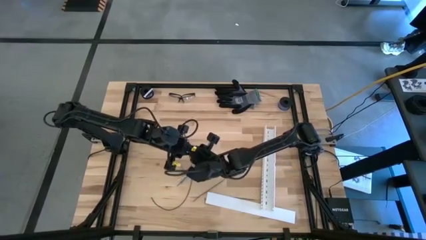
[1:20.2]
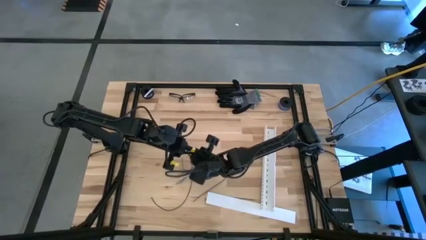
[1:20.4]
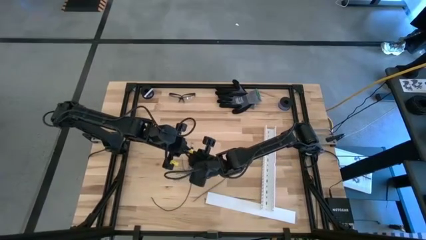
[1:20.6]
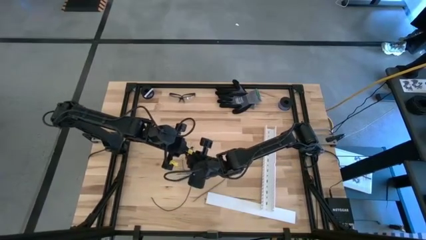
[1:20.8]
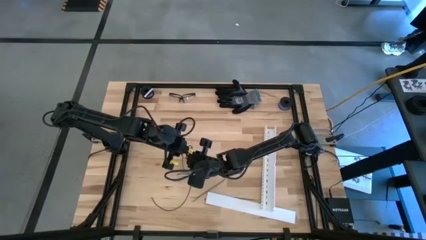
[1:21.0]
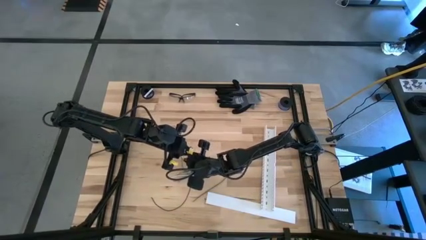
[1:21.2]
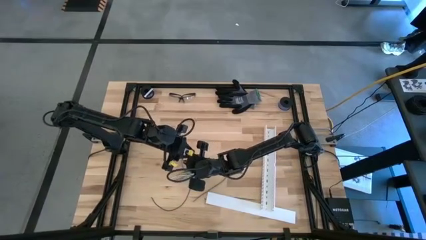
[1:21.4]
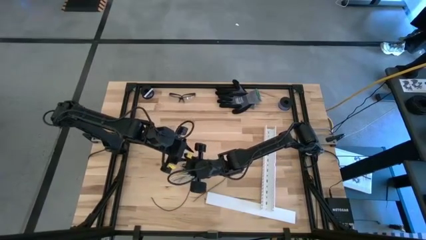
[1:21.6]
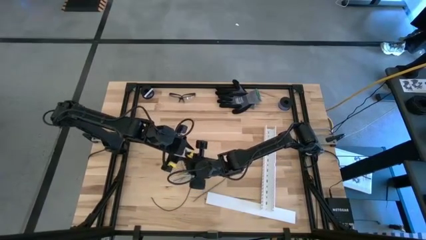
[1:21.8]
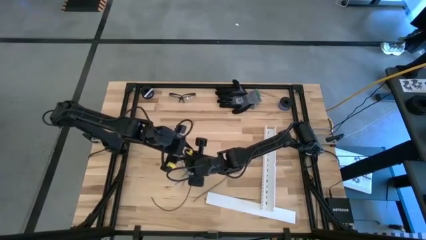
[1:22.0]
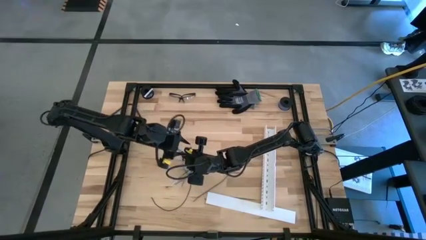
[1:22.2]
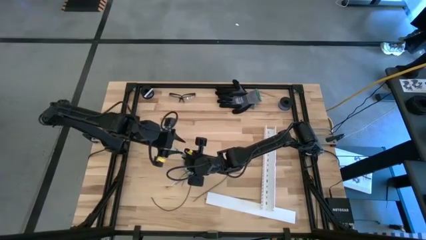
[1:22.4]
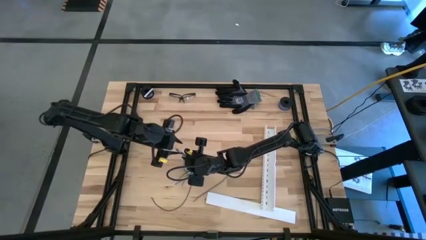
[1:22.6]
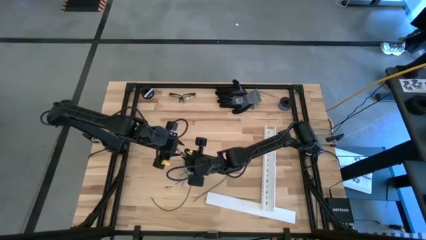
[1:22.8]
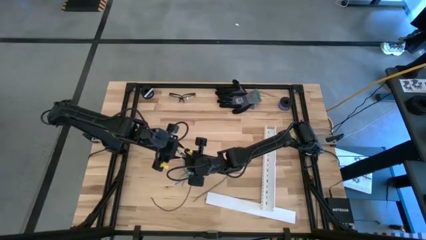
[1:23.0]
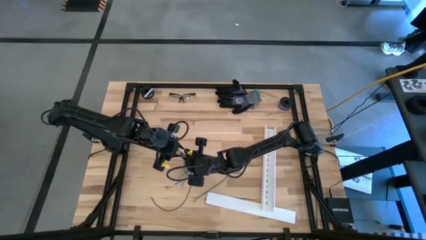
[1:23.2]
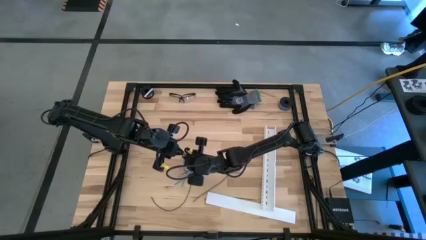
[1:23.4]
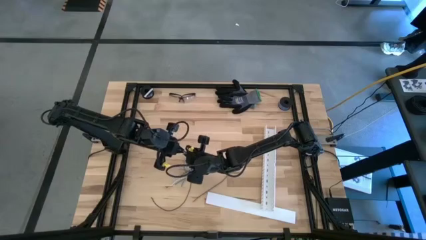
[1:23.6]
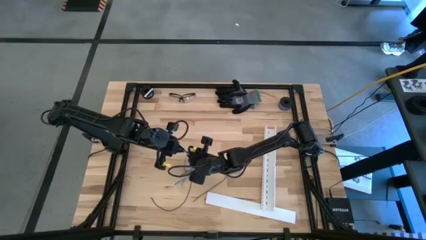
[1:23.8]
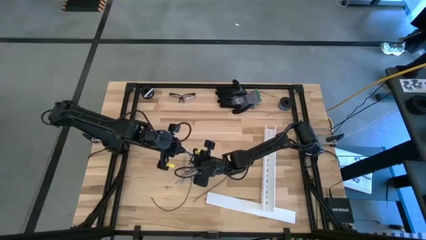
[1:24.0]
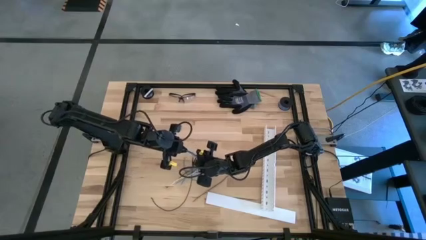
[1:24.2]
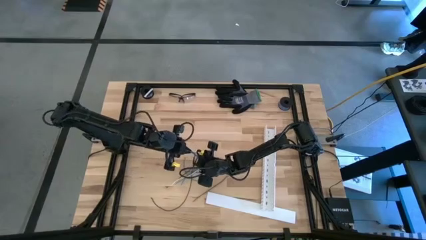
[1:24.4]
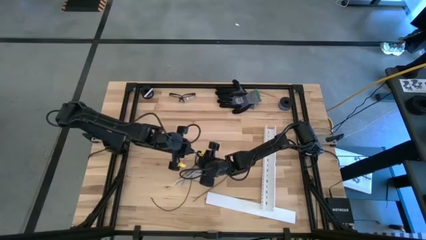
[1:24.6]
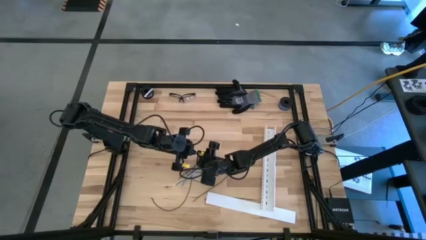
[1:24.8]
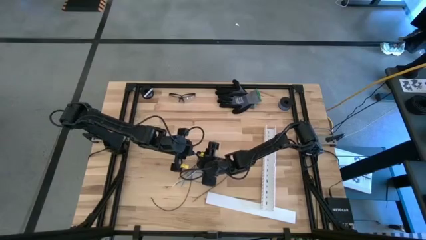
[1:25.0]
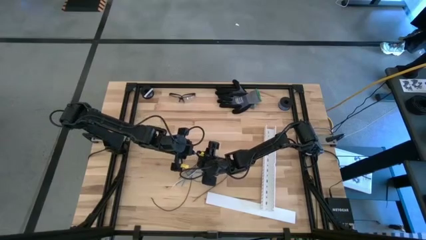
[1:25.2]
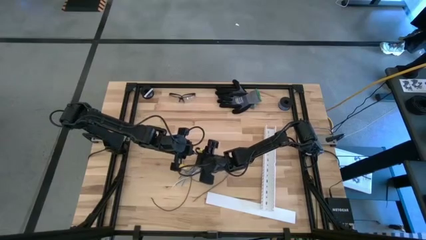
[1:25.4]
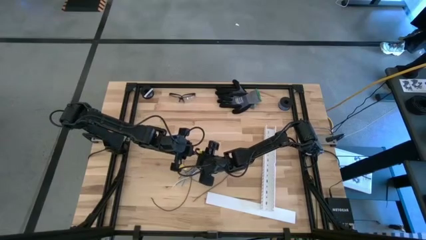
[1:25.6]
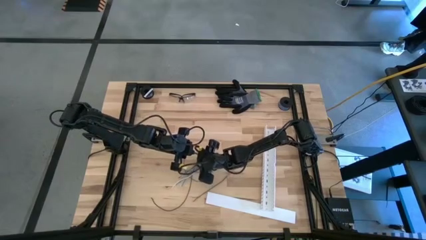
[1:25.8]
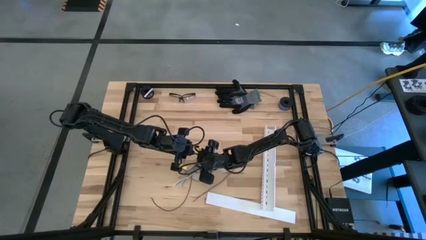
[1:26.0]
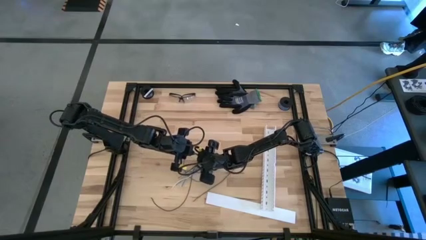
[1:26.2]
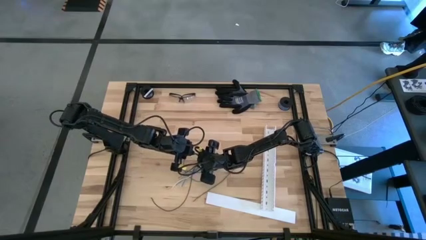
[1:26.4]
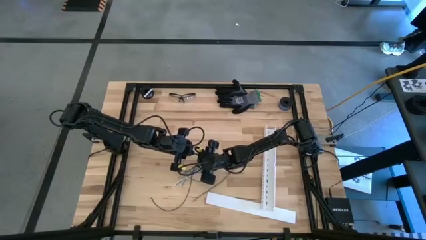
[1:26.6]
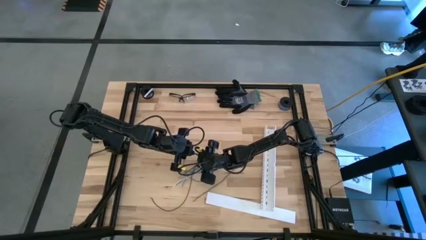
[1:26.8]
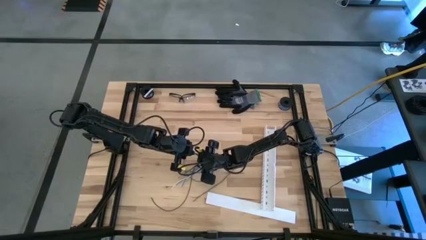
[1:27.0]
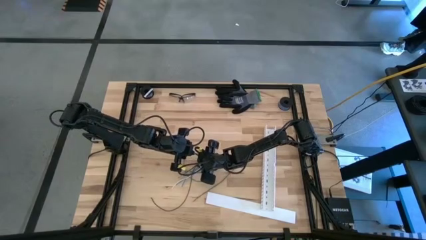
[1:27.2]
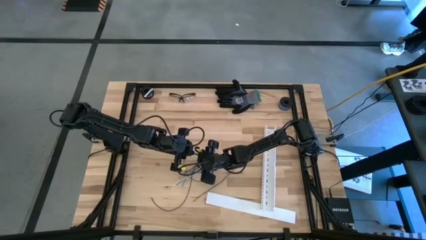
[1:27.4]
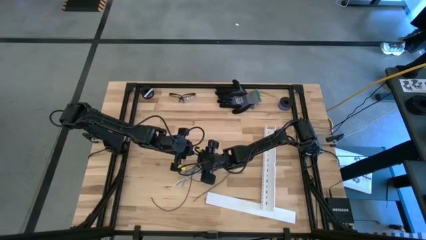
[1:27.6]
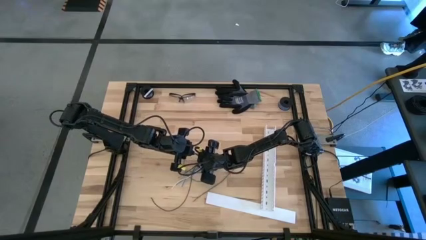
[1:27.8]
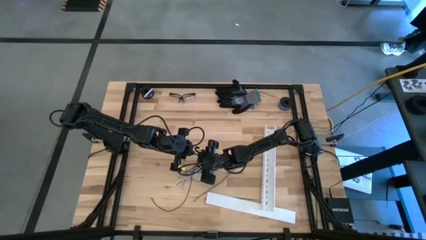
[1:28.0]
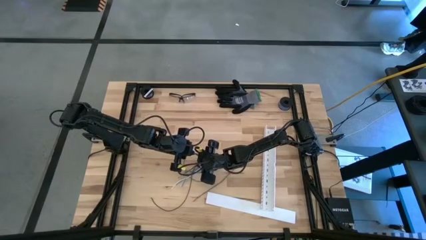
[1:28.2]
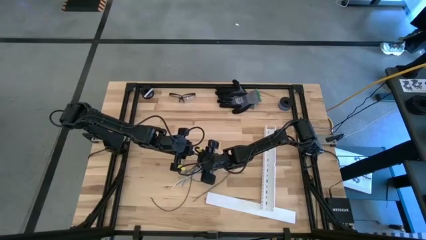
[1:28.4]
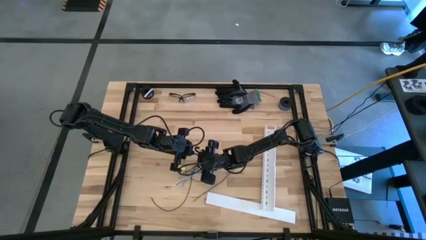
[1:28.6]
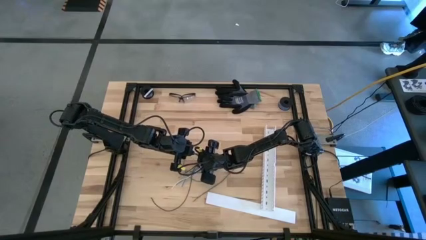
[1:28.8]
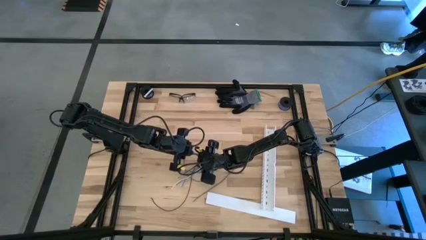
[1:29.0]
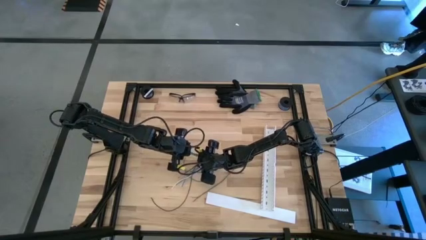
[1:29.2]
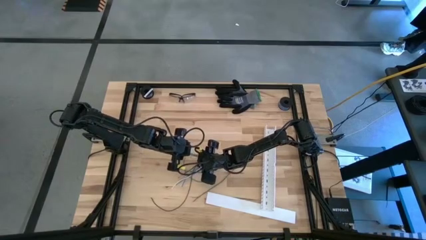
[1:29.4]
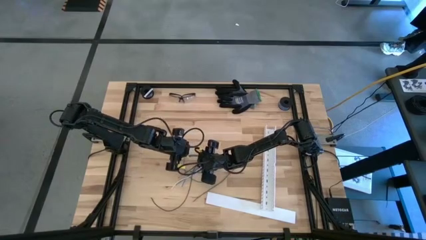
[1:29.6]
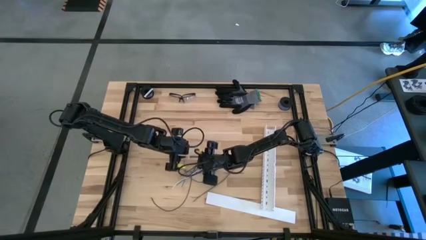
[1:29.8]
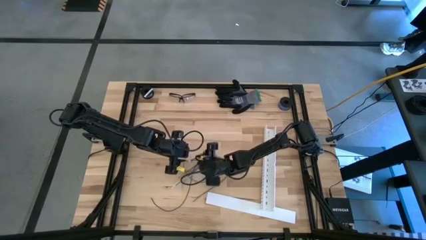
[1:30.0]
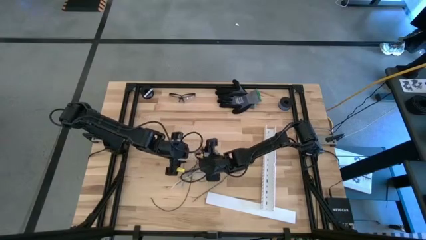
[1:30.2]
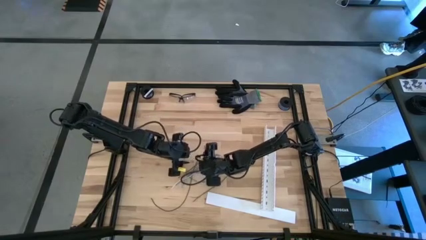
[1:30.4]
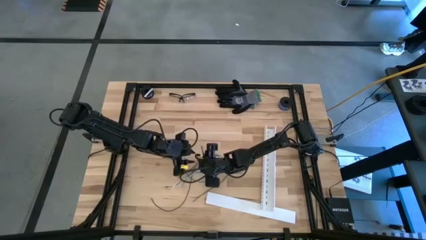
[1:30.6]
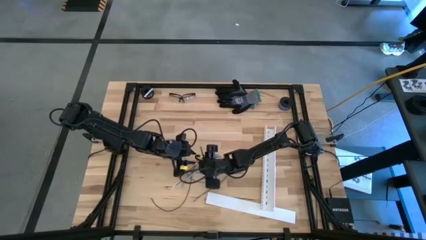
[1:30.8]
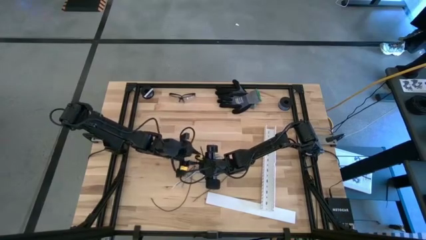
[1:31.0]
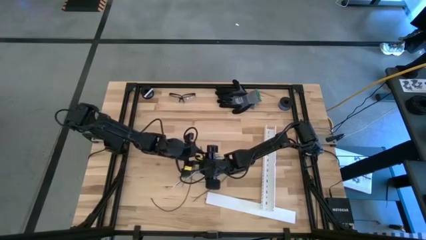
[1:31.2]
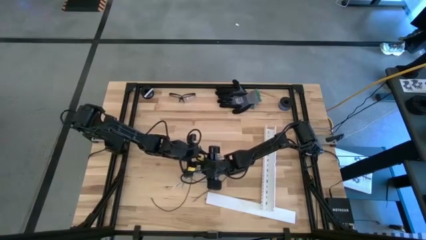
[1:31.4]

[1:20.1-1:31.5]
Task: Ziptie cables
Wrap the cable wires with the black zip tie

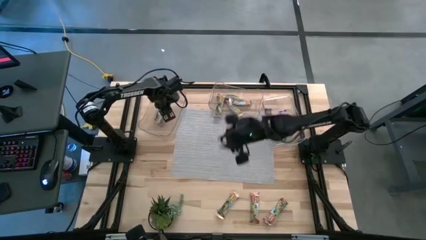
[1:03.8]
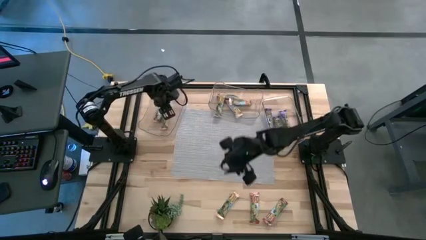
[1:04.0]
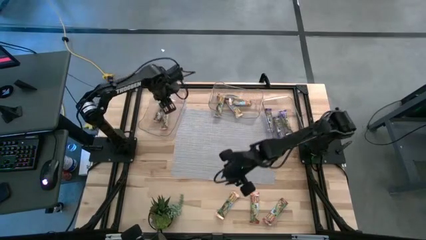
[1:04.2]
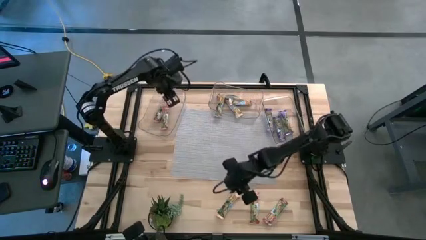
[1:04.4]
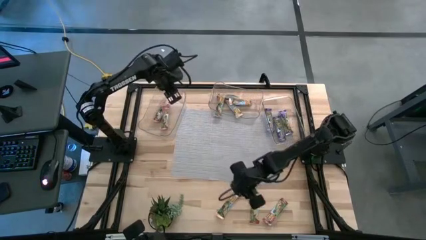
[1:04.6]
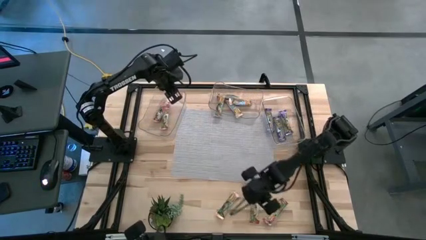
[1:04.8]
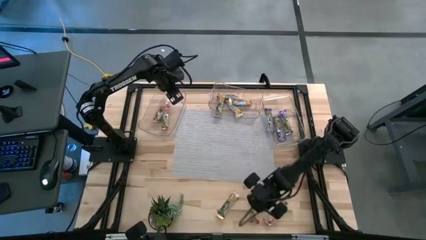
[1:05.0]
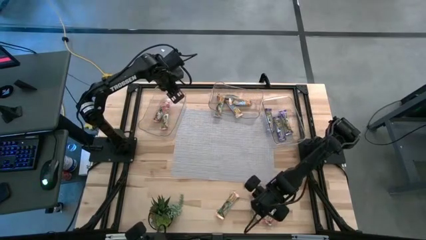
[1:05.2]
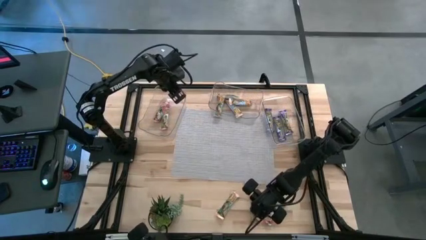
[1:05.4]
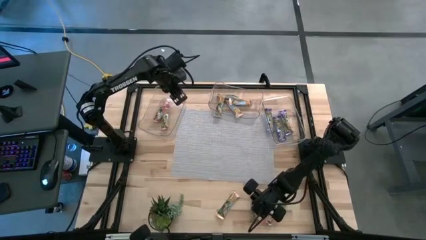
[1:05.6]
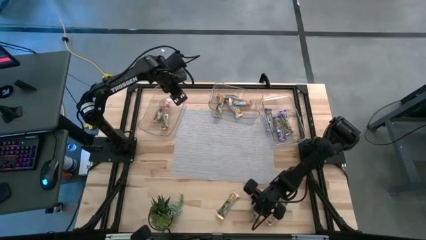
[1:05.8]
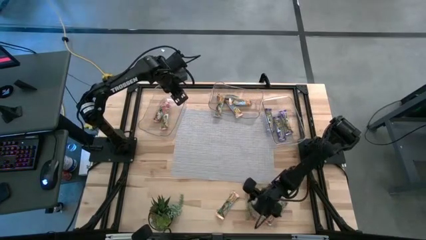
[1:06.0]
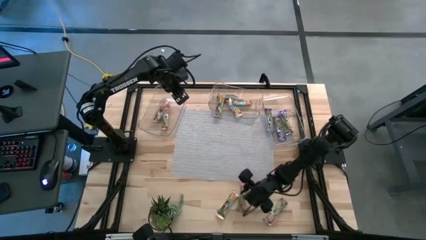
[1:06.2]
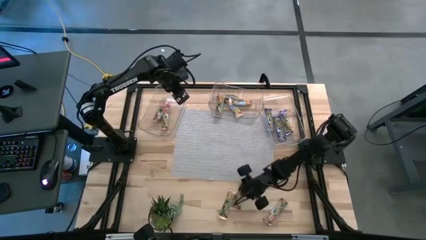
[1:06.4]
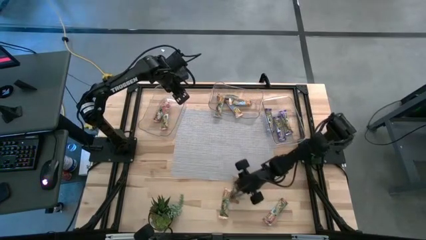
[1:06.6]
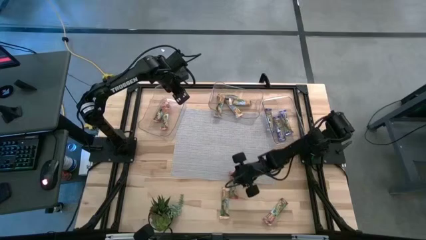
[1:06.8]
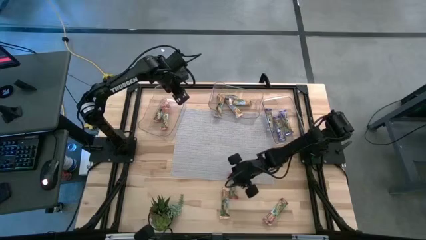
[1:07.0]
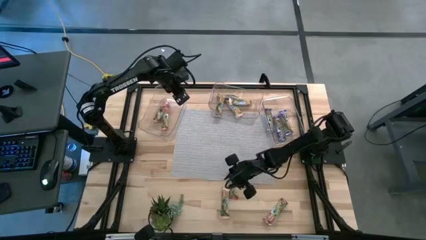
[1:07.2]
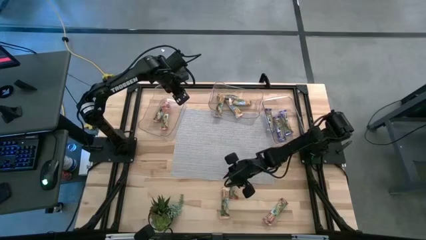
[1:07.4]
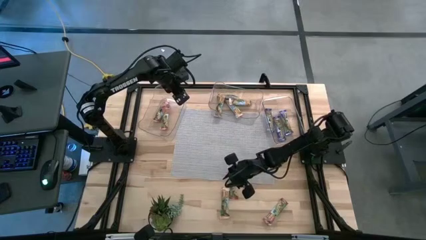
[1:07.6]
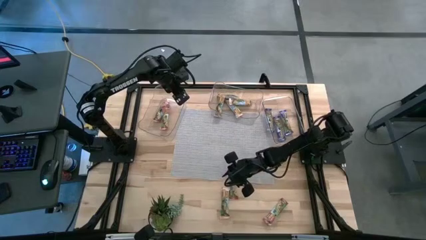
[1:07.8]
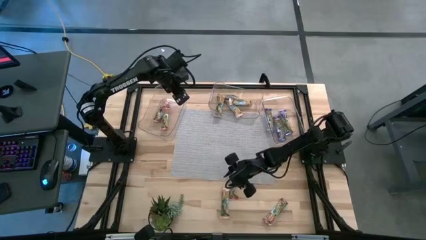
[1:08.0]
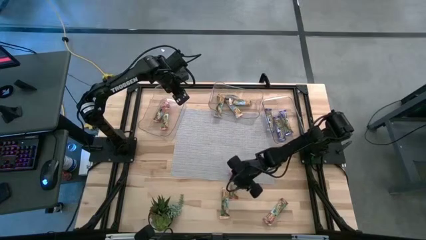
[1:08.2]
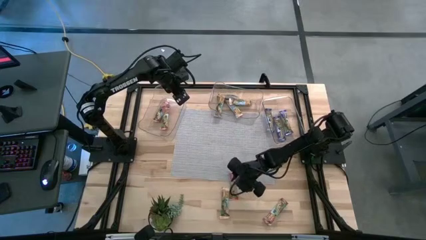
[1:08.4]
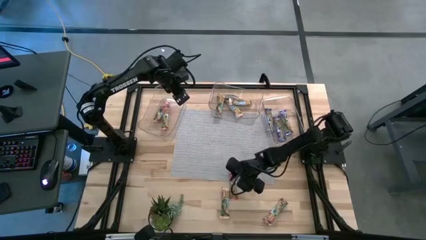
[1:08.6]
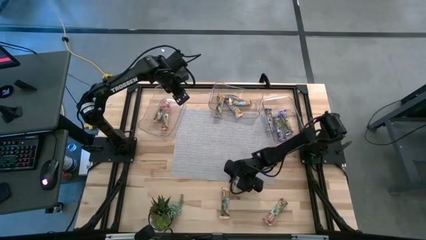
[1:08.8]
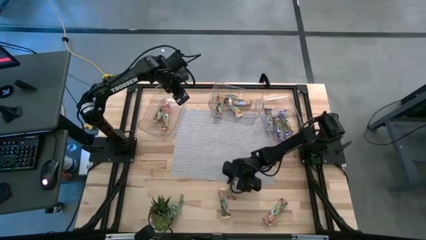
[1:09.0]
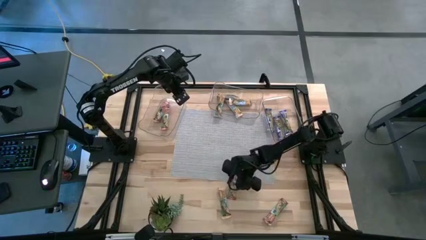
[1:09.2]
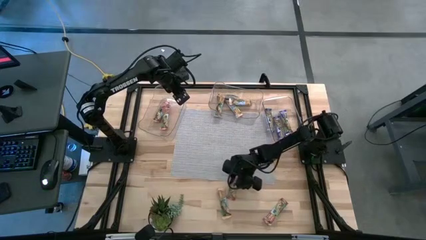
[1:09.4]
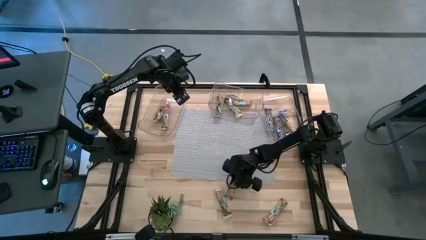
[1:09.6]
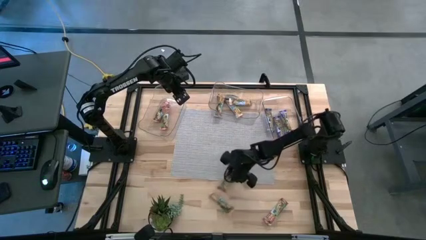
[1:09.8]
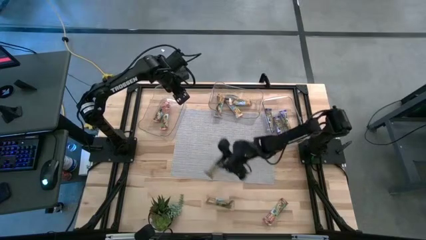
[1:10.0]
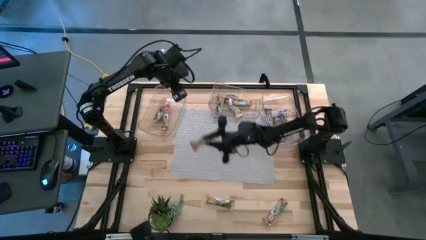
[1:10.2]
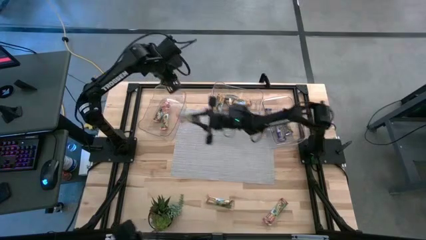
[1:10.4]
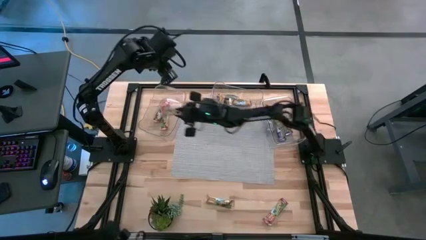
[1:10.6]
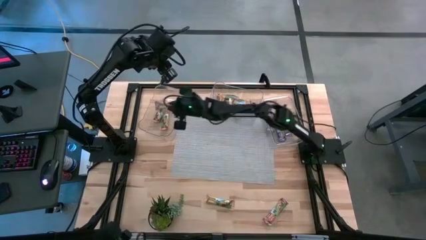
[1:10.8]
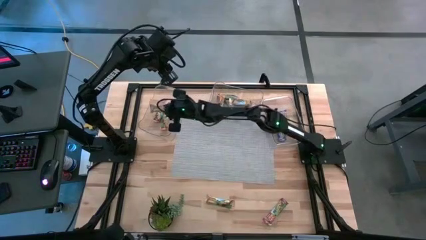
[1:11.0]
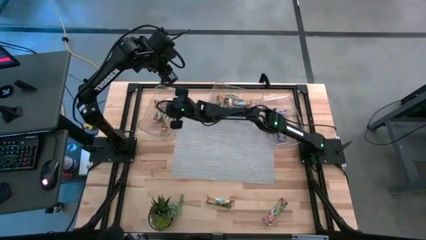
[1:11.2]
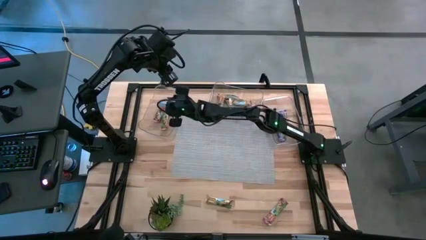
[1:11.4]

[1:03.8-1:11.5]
Task: Pick and place Granola Bars by type
Put the red granola bar into the left transparent bin
